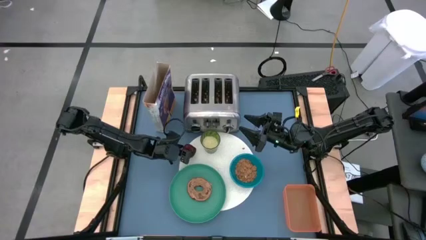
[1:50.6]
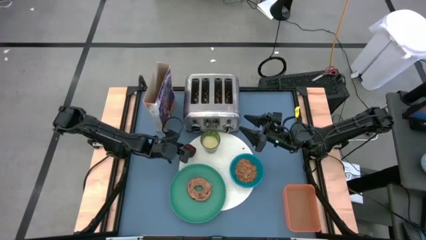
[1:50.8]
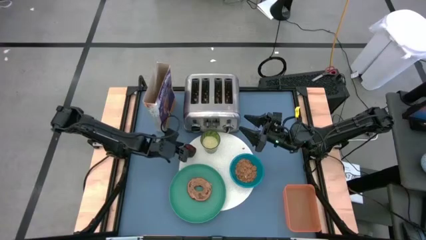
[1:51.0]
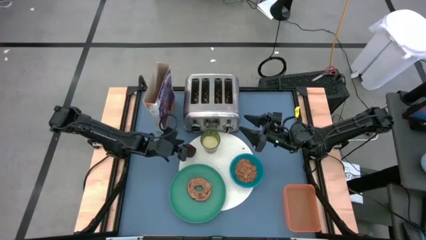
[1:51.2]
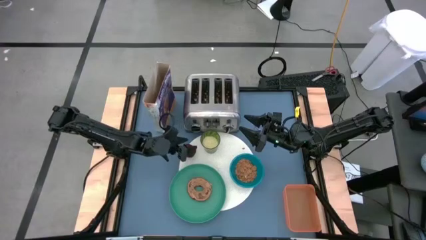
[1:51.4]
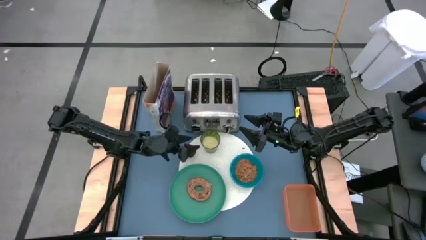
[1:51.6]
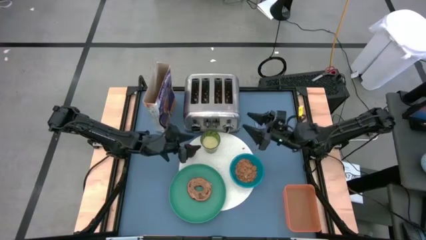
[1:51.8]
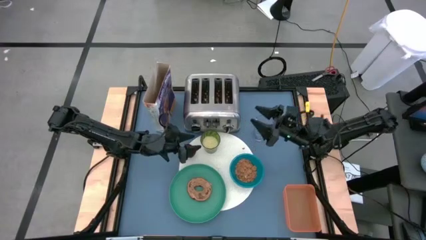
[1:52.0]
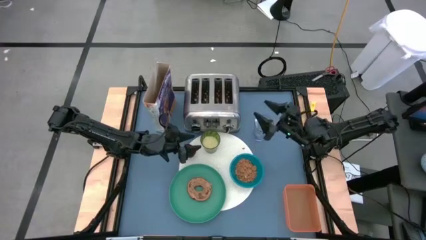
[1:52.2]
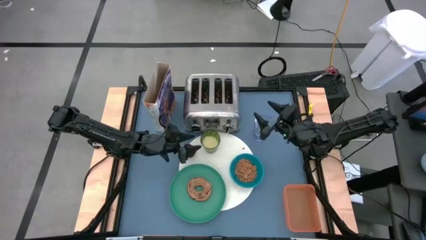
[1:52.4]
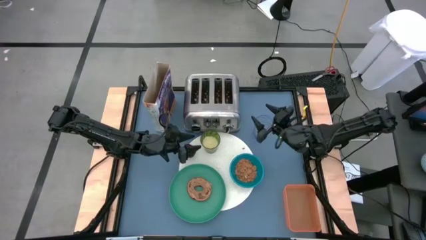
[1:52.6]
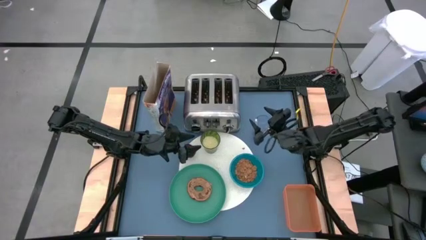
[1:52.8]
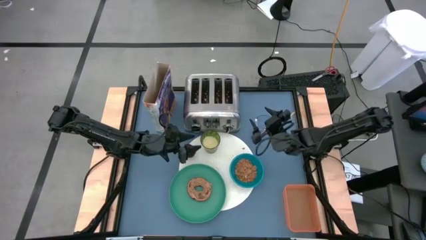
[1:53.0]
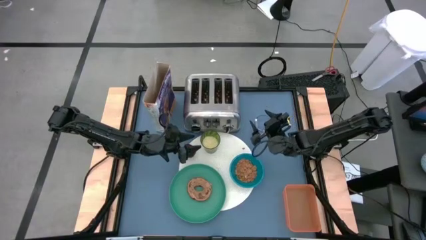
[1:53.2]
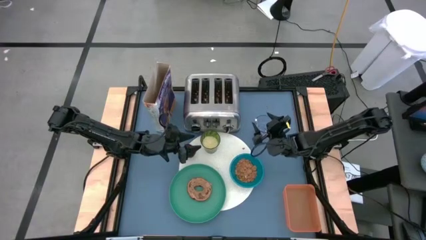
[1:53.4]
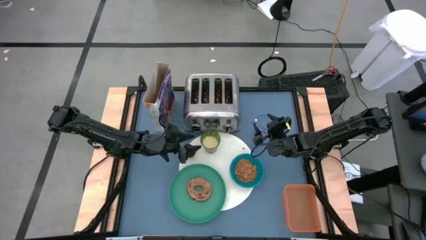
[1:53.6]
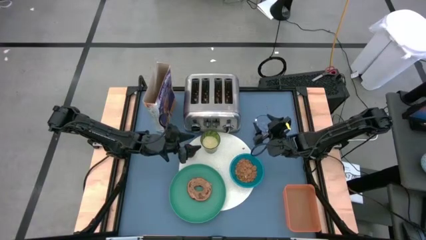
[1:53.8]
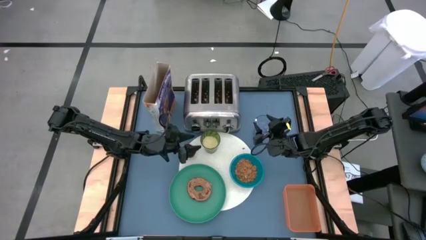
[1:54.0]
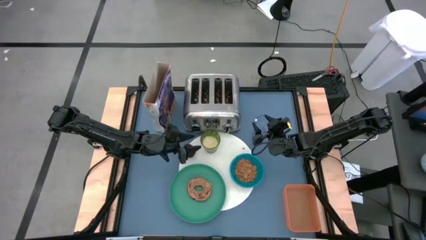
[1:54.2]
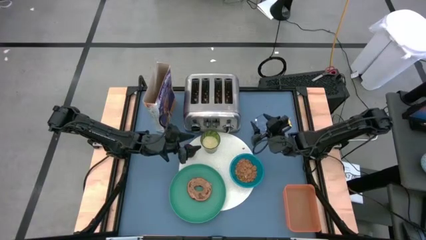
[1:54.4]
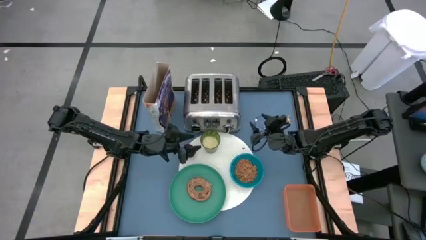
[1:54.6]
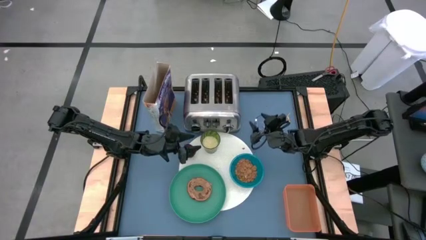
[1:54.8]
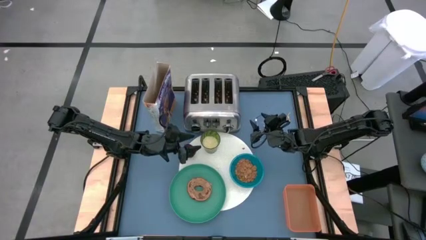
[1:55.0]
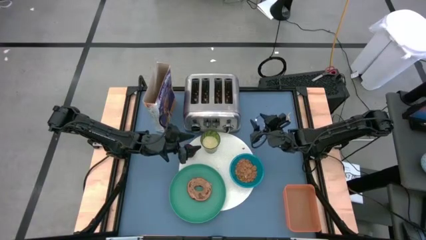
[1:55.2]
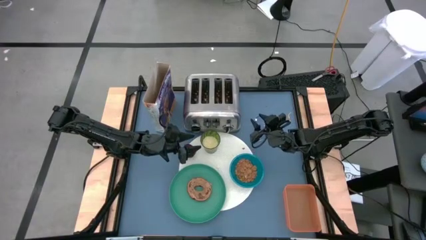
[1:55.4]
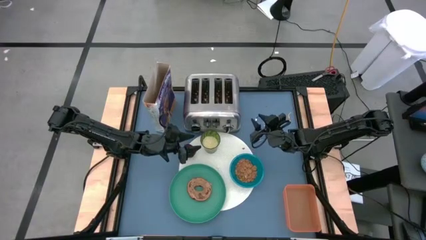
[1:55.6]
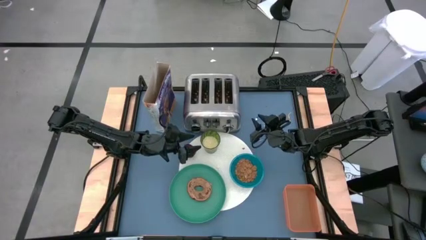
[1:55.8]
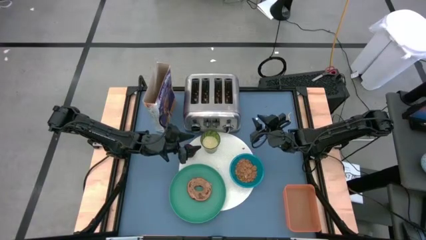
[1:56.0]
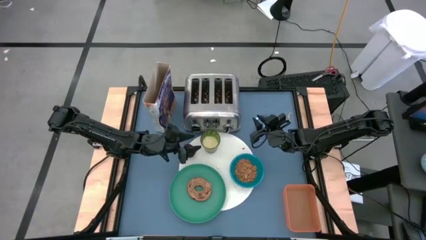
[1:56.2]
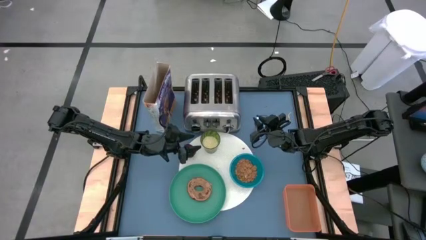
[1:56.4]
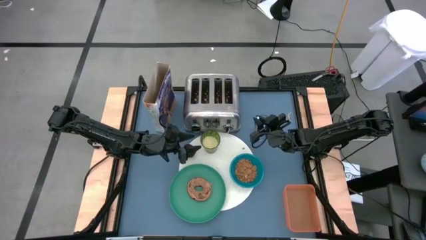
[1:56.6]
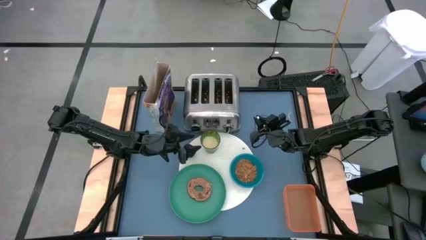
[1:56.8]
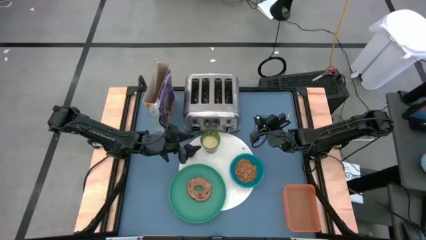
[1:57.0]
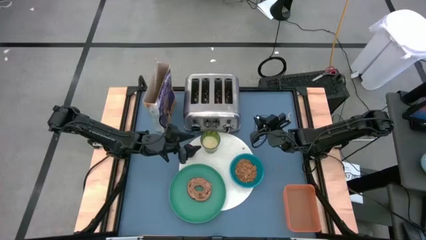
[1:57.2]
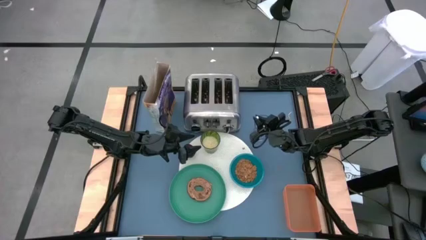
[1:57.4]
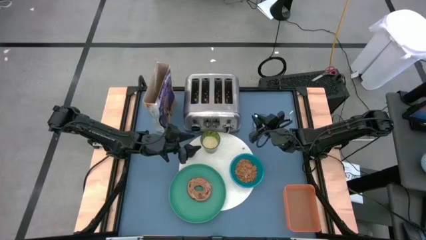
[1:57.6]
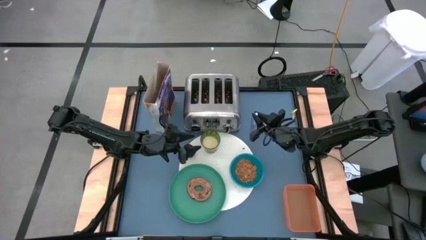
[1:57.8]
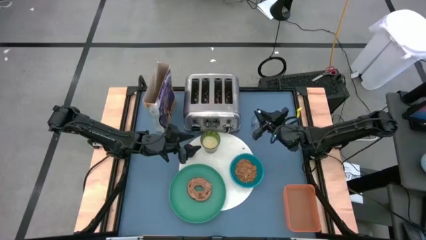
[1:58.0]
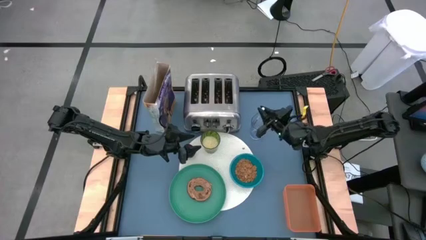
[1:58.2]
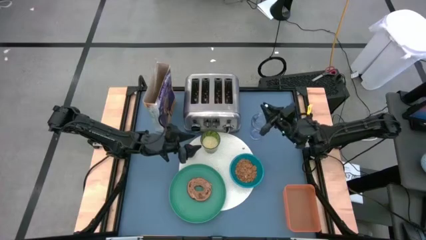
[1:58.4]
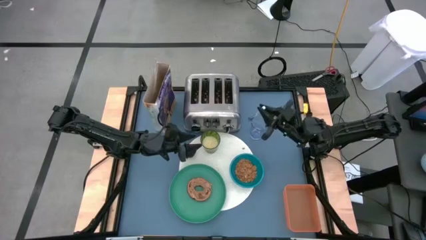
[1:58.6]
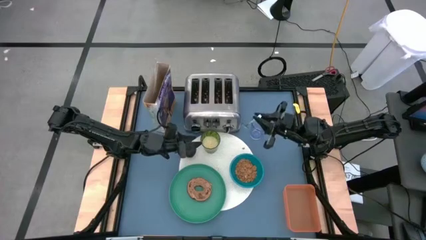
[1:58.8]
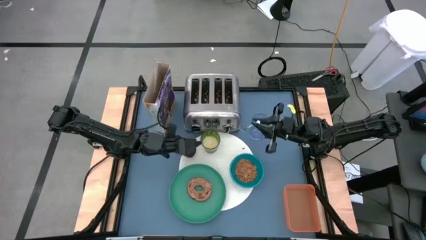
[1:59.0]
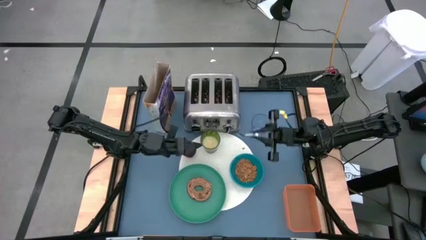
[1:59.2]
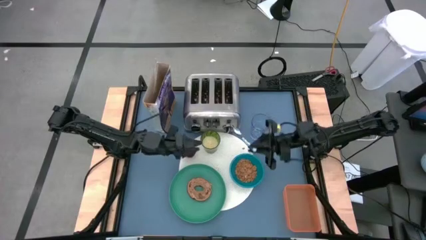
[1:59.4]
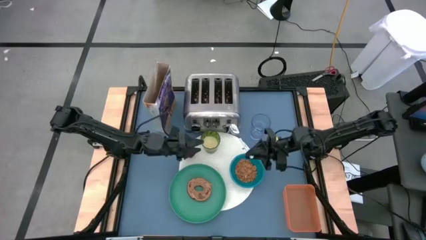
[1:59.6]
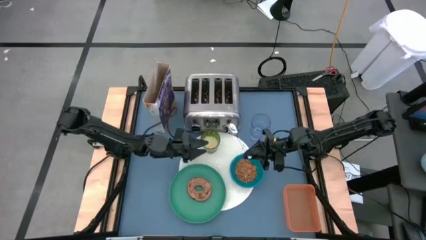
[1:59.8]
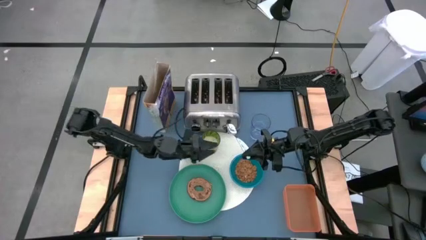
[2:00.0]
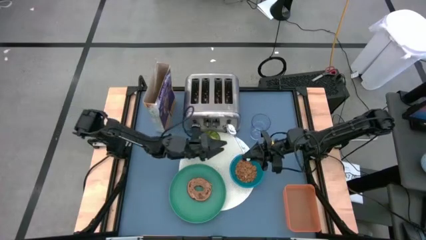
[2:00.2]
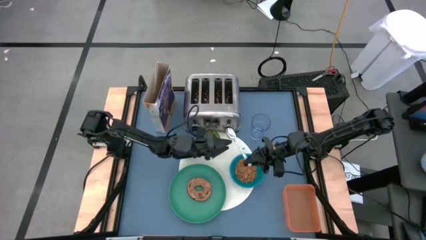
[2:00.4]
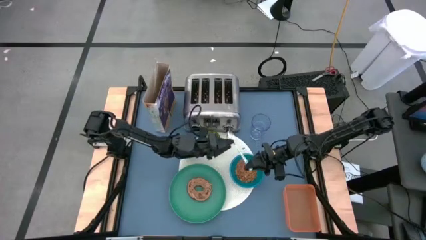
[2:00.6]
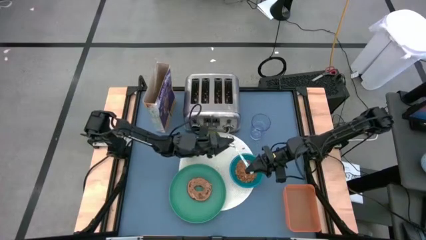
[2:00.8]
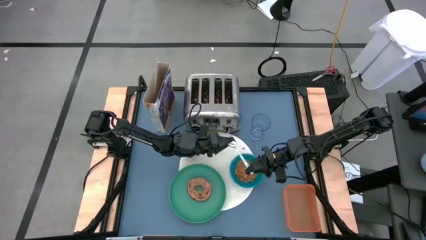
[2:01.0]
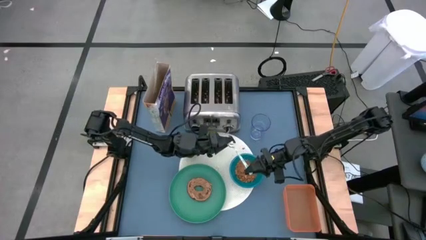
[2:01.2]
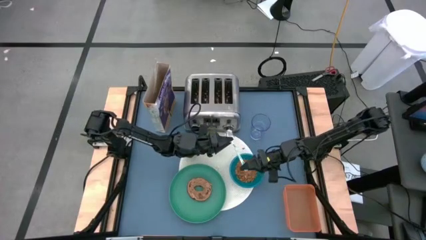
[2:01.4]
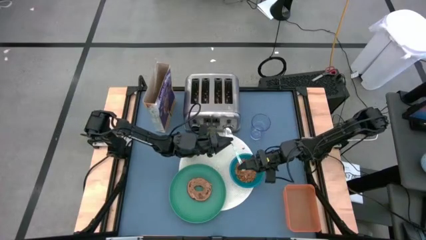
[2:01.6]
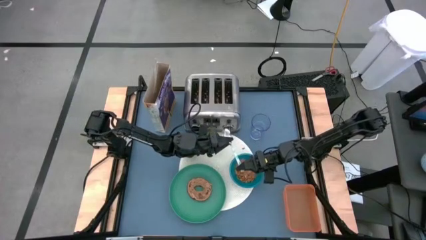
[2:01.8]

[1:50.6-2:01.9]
Task: Arrange a breakfast setting
Put the blue spoon to the right of the blue bowl

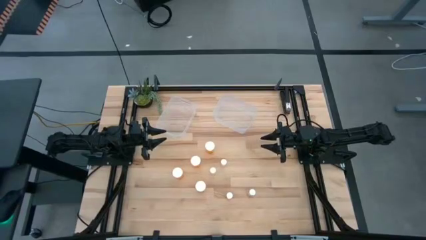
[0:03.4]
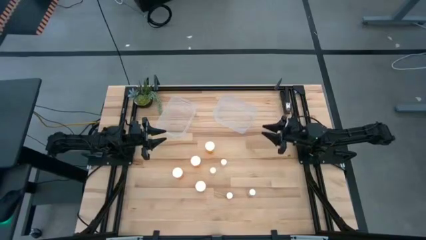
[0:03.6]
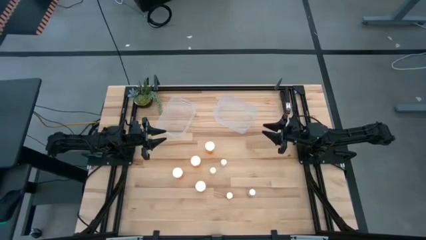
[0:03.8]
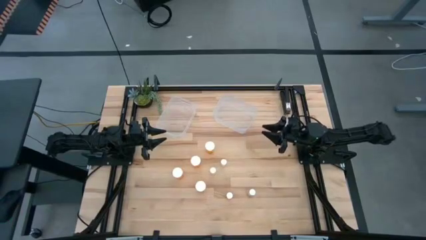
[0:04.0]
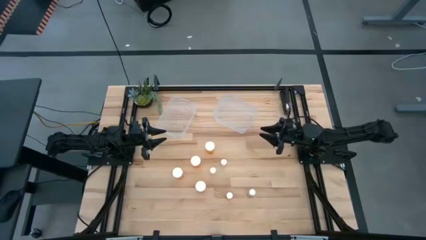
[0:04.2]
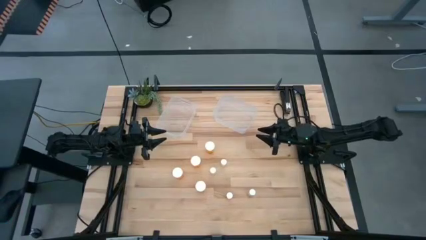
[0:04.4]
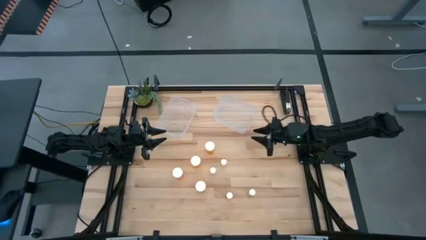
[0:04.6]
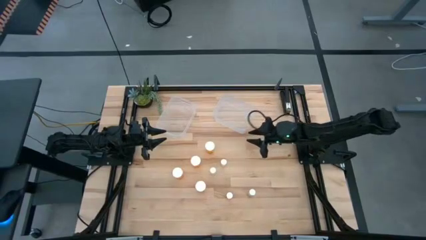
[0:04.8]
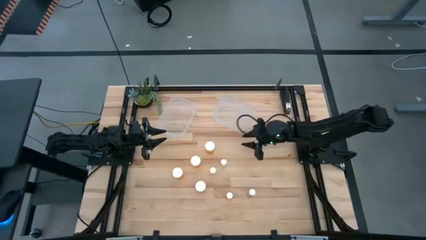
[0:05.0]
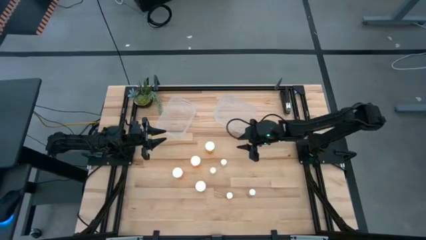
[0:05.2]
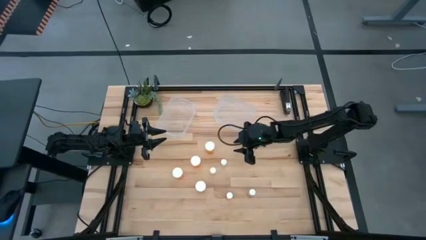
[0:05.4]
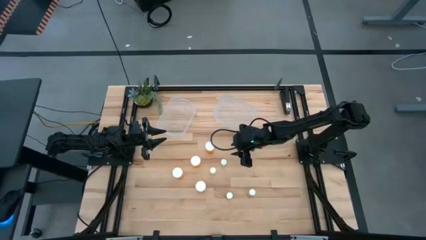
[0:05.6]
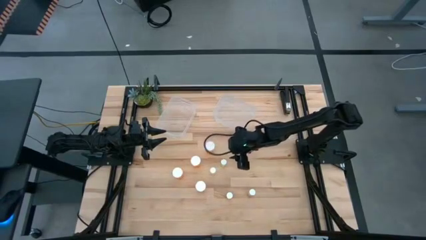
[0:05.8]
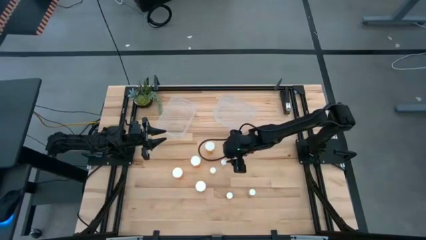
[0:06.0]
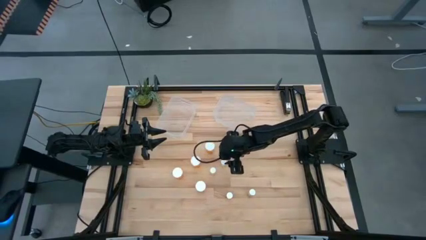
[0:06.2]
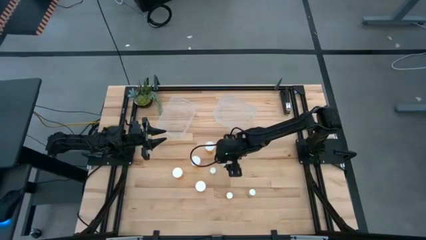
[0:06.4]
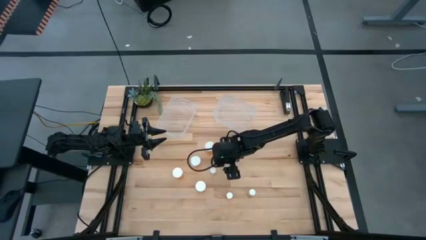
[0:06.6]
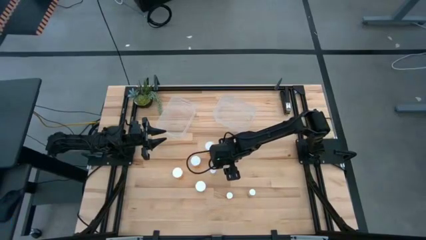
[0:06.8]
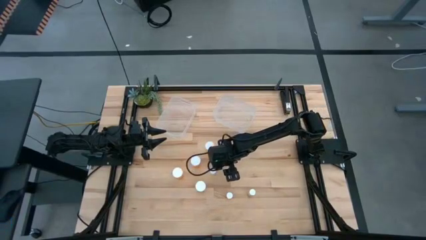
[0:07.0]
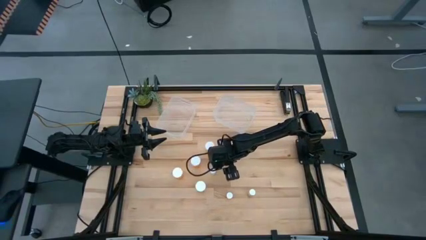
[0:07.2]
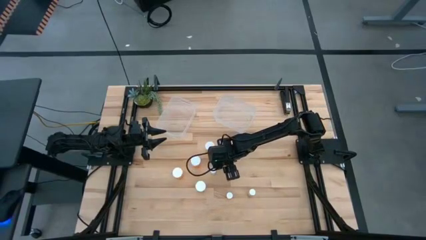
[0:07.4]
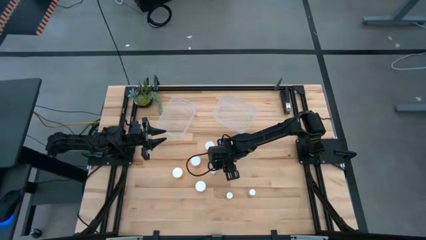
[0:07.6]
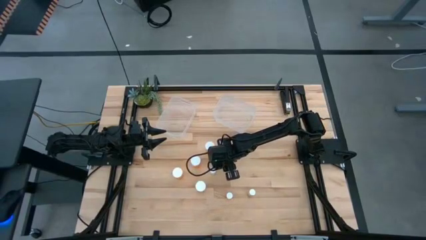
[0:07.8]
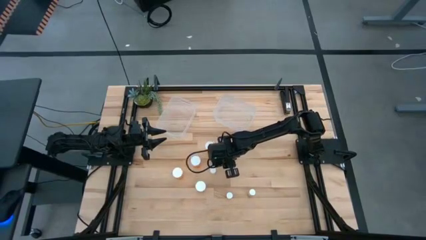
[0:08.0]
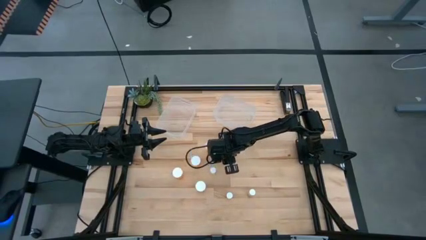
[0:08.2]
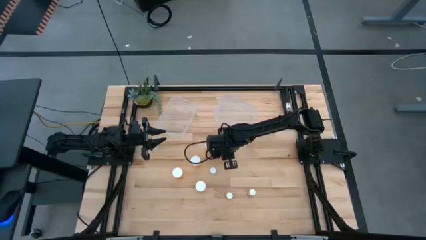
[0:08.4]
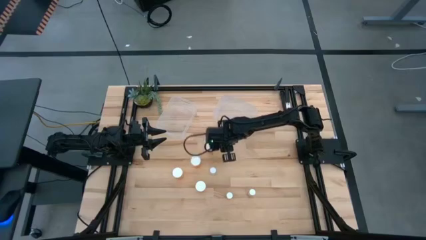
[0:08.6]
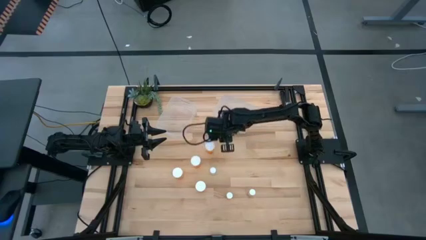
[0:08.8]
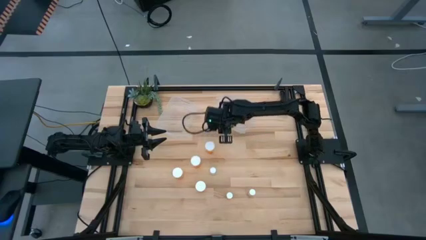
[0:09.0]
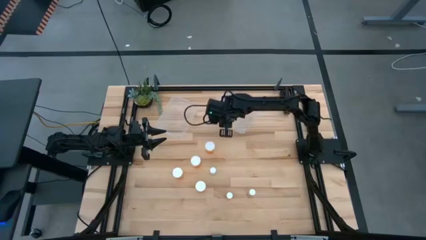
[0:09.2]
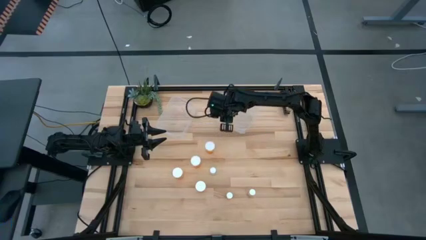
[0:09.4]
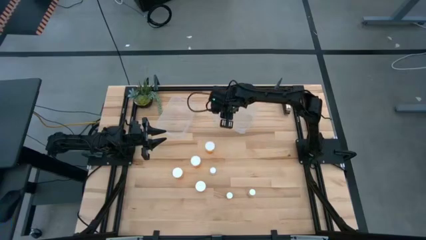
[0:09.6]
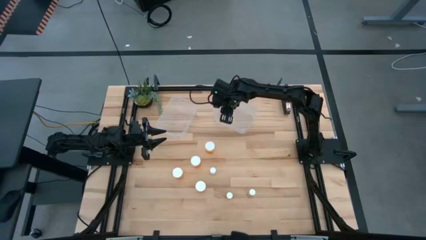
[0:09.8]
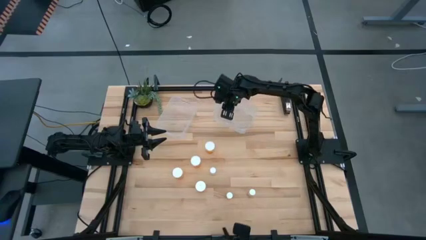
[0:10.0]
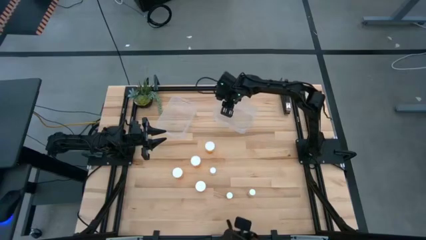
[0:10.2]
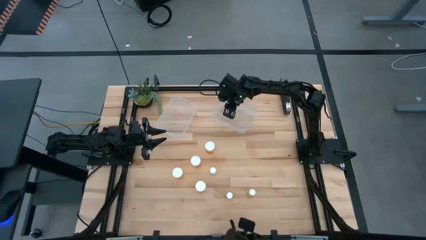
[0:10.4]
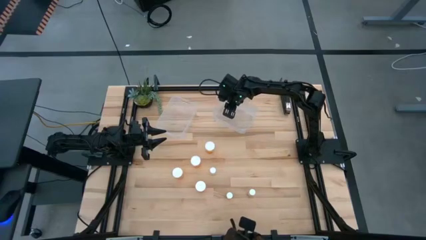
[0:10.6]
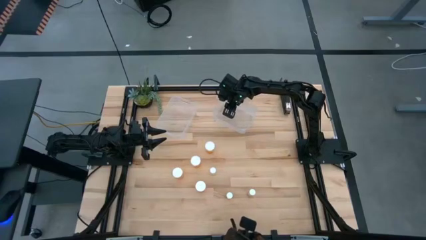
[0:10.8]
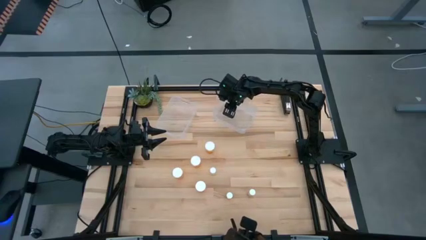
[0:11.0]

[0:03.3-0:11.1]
Task: Pick and place medicine bottles into bin by pill shape (circle, oval)
Put the small yellow pill bottle into the right transparent bin
